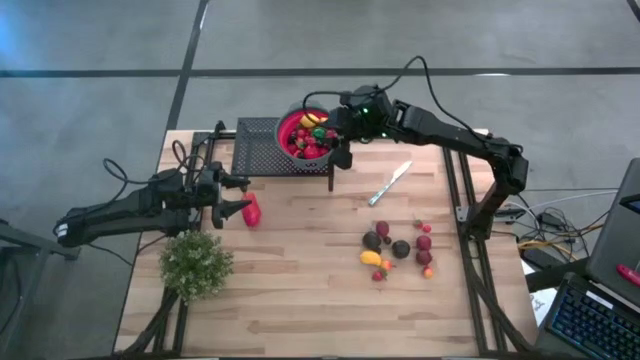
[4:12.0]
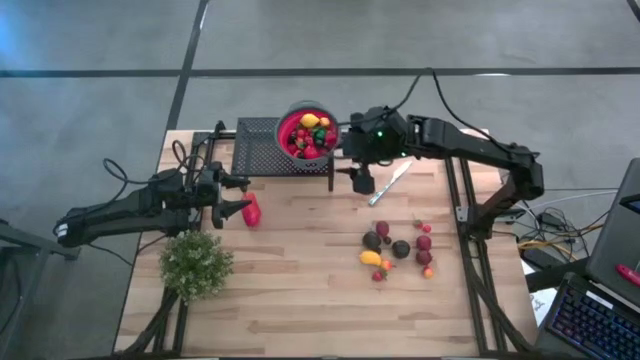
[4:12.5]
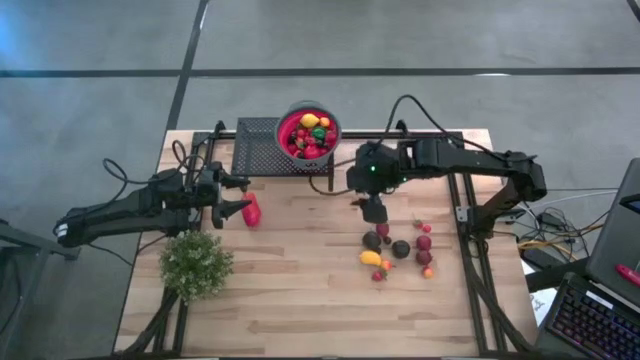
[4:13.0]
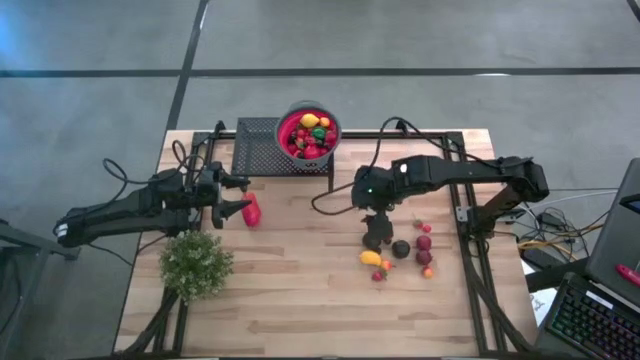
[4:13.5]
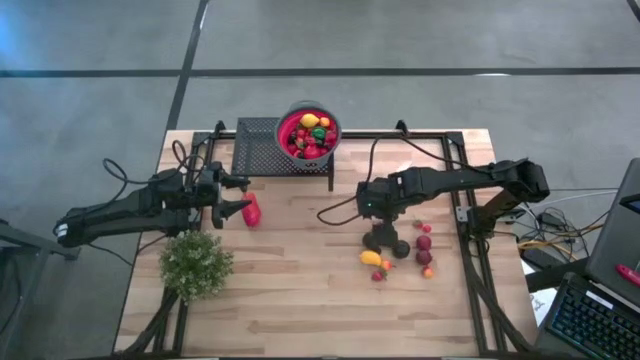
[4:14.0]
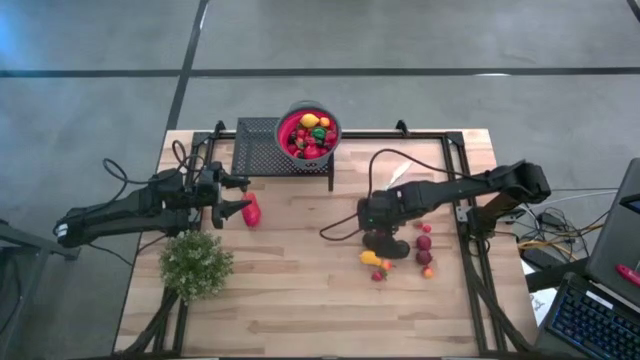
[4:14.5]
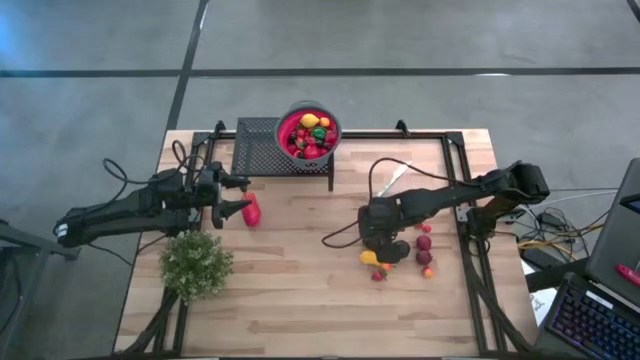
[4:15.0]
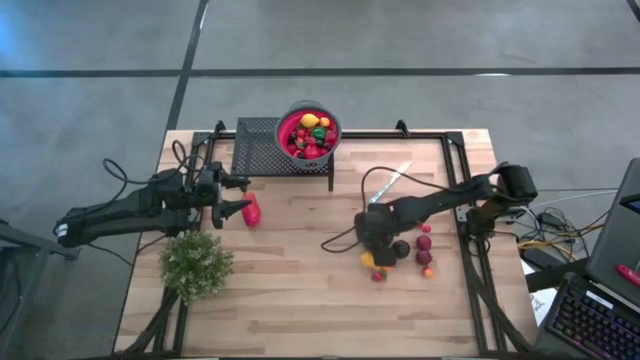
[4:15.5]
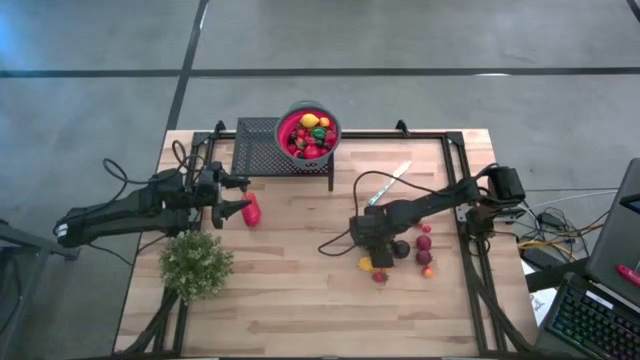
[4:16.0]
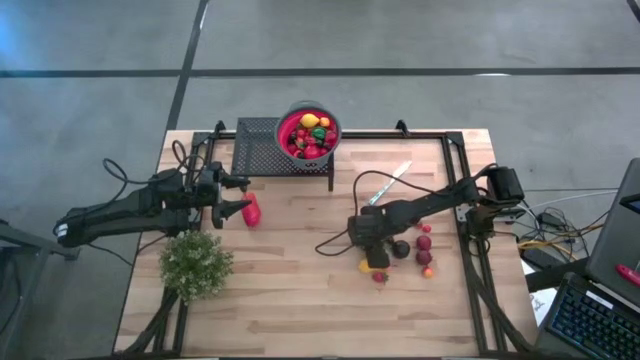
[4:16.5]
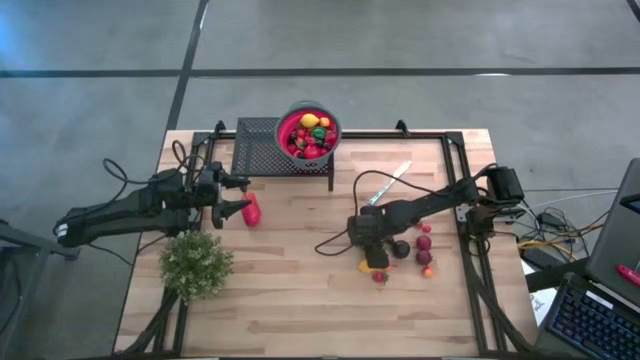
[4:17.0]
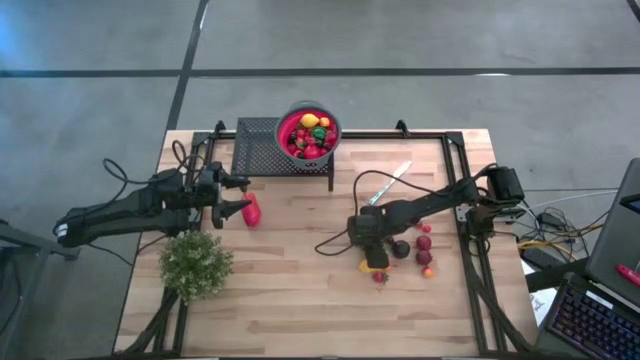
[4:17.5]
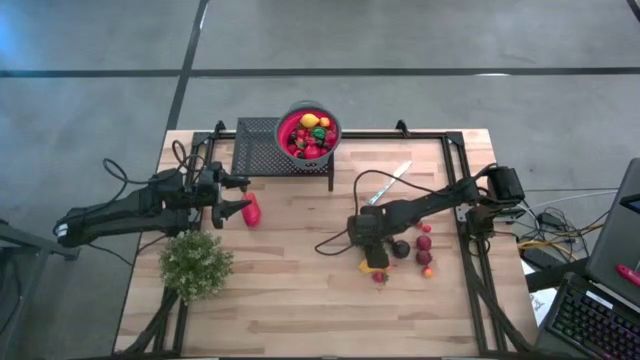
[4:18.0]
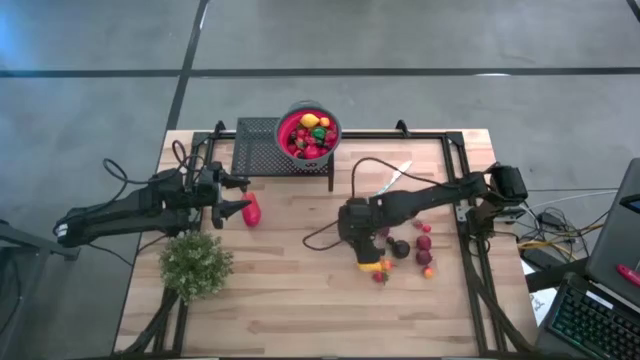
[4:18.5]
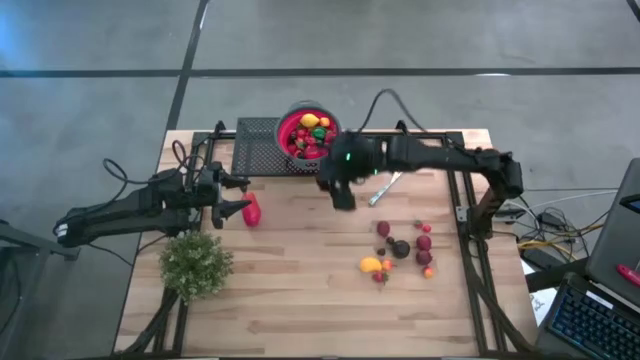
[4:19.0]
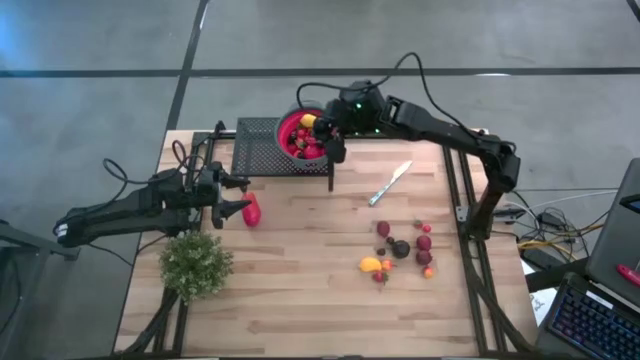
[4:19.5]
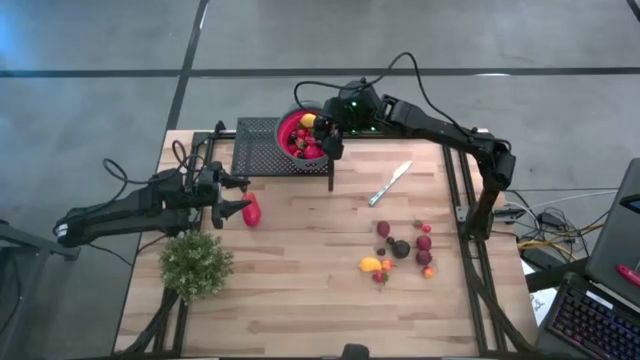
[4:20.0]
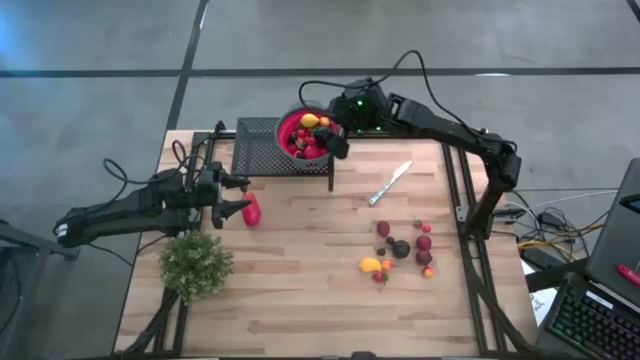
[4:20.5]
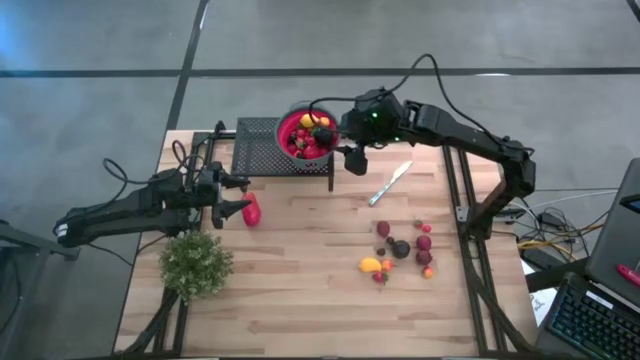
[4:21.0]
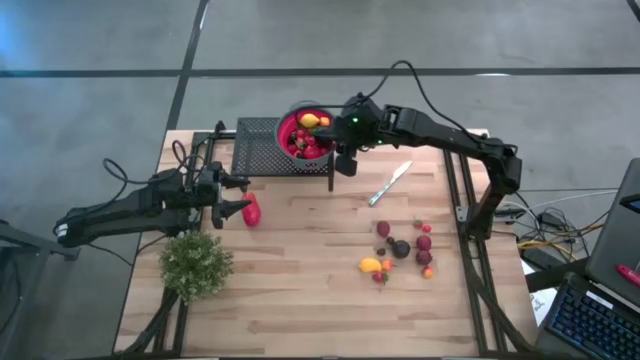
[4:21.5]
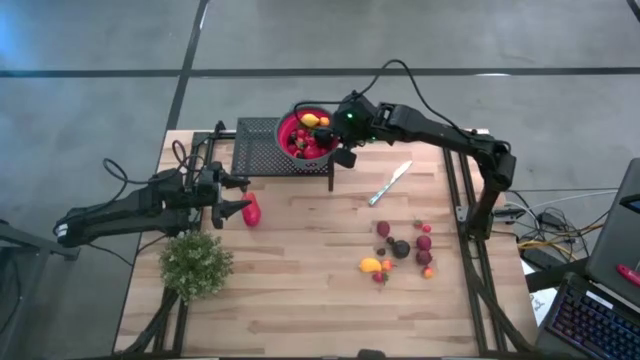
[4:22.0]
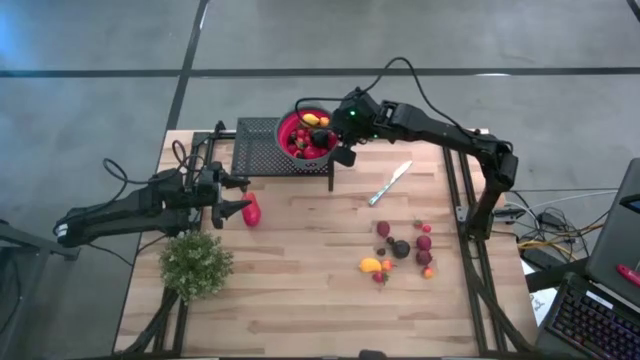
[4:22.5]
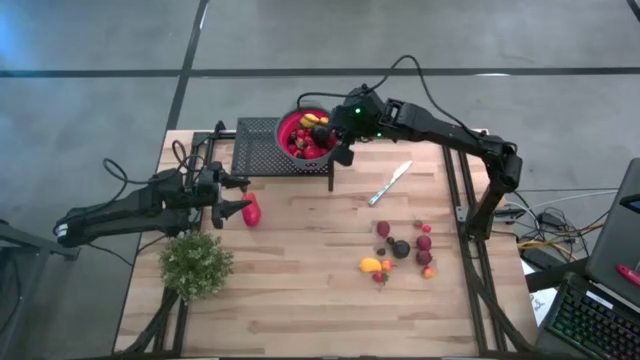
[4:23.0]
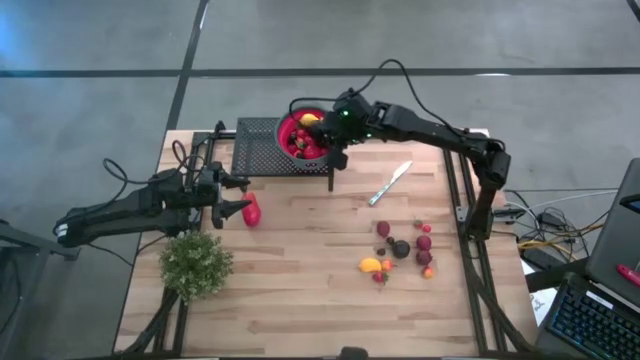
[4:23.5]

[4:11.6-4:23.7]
Task: Pick & Place Fruit
Put the black plum into the red gray strainer bowl on the shelf

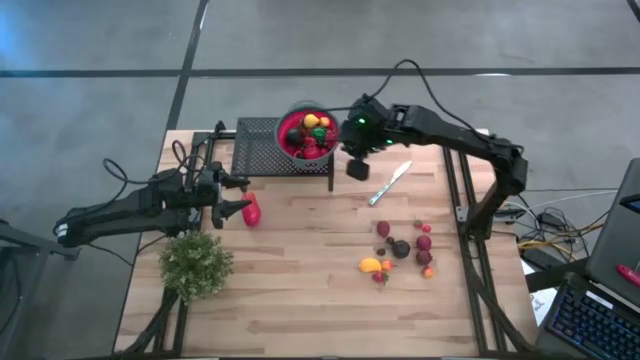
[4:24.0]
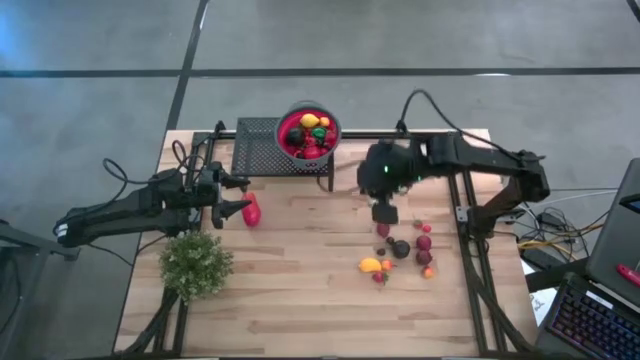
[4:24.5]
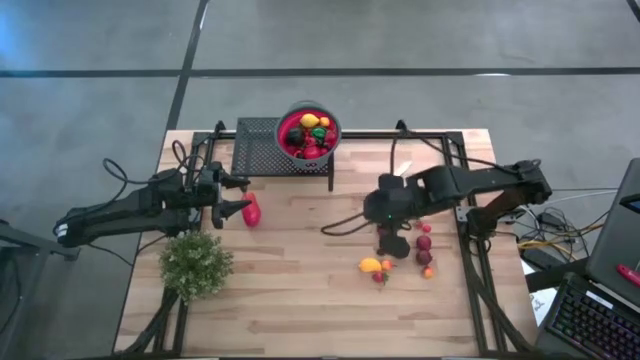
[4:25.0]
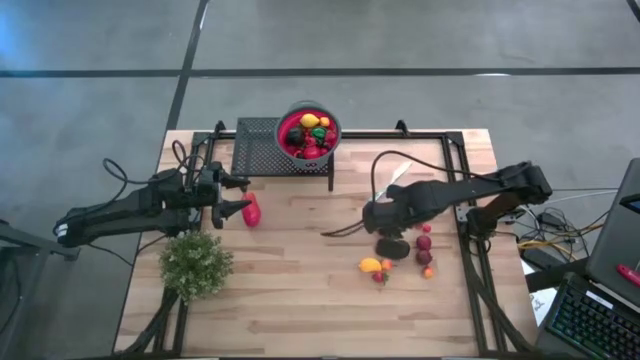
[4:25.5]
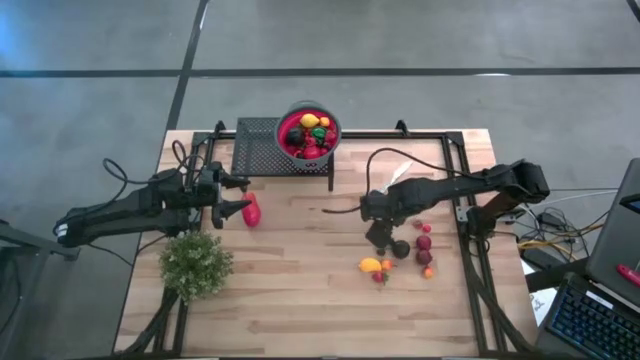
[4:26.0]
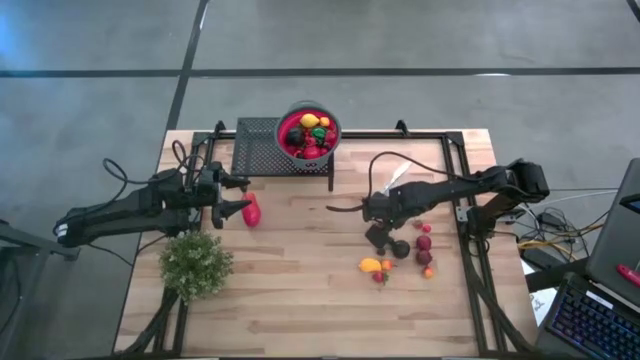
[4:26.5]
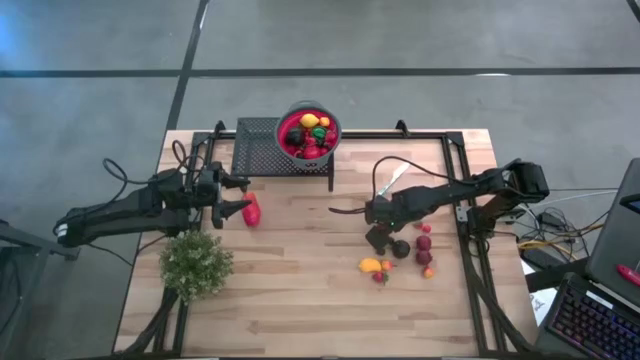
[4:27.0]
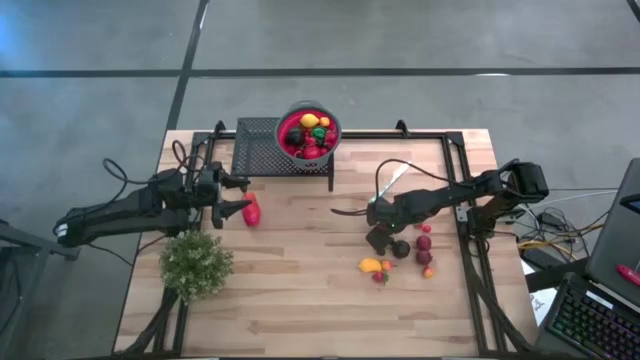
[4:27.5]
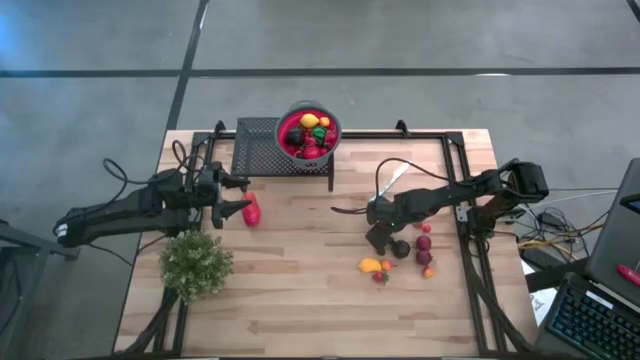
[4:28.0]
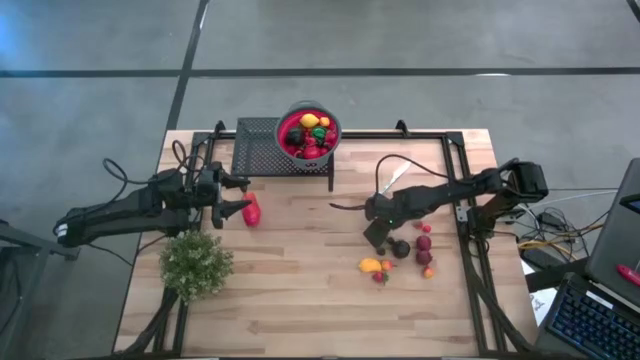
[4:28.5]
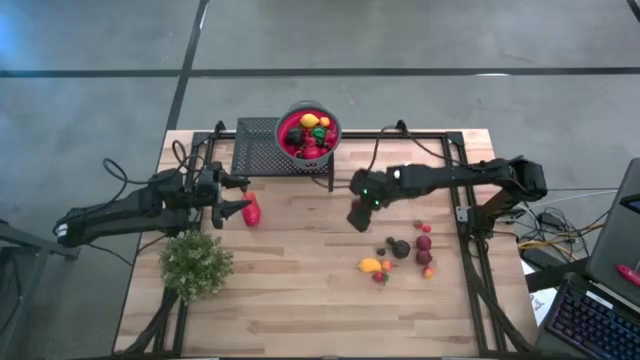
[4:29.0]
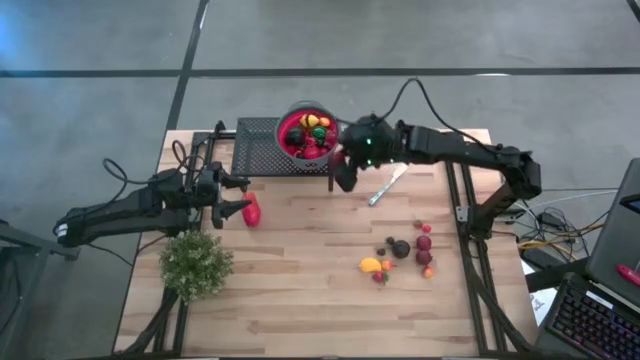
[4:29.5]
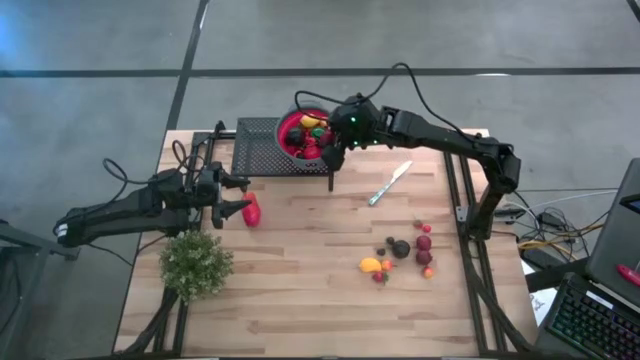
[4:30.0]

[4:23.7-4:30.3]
Put the red pomegranate into the red gray strainer bowl on the shelf

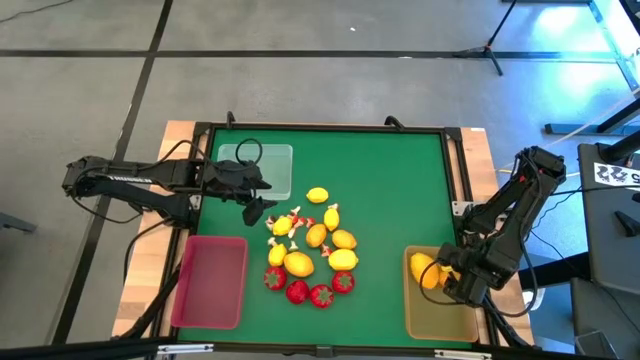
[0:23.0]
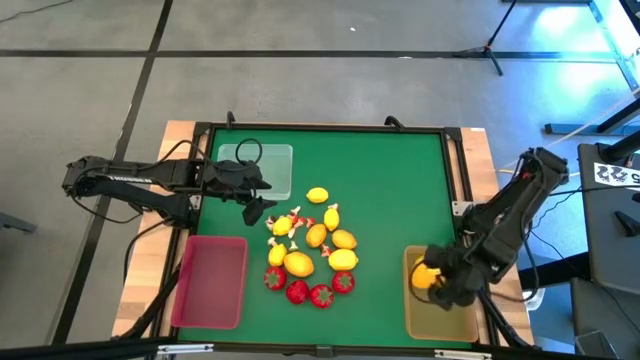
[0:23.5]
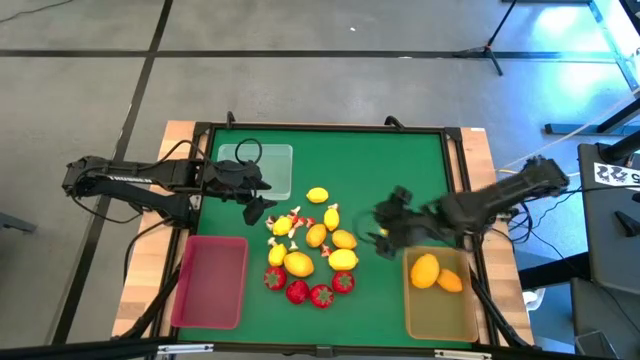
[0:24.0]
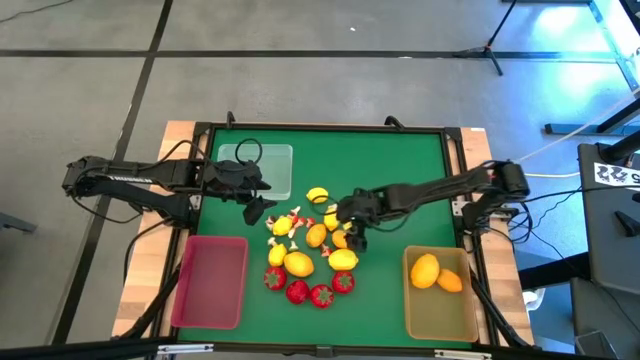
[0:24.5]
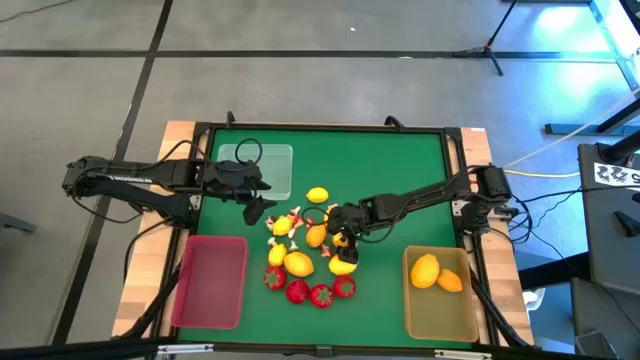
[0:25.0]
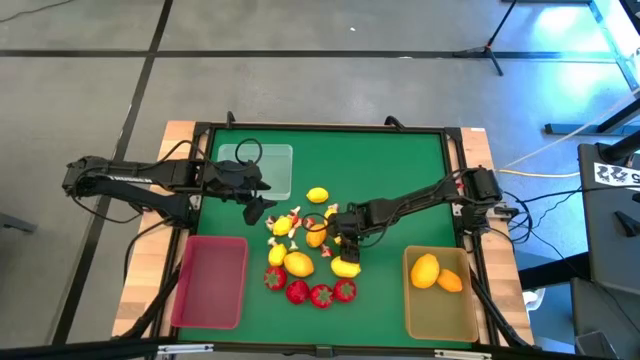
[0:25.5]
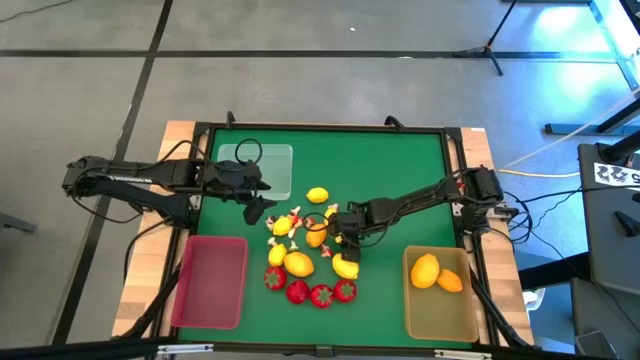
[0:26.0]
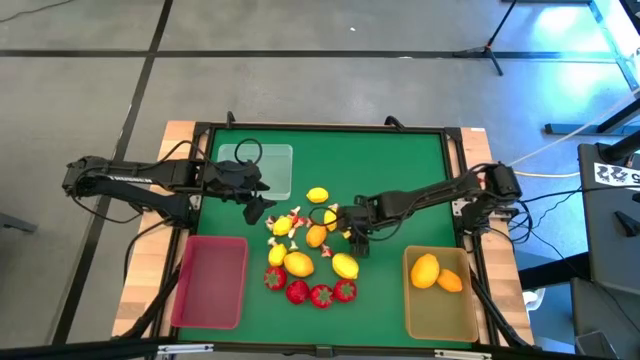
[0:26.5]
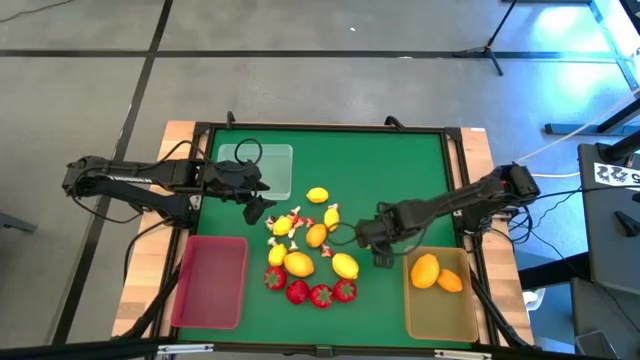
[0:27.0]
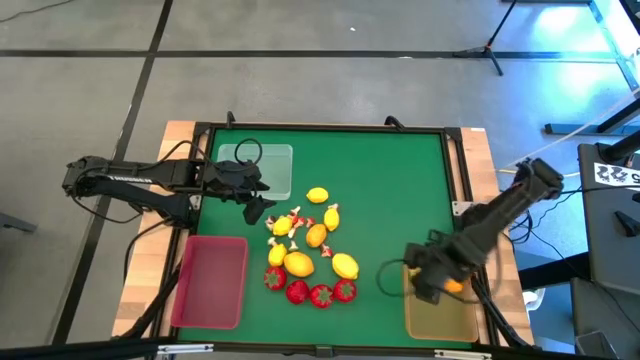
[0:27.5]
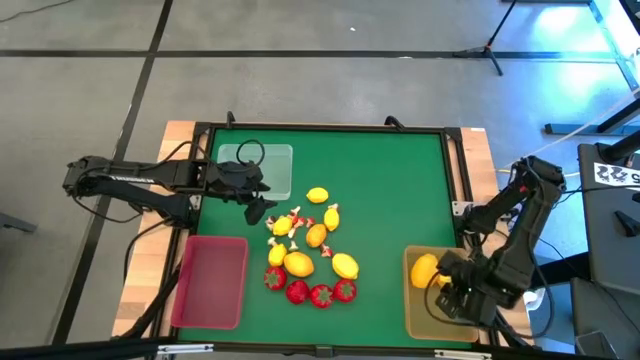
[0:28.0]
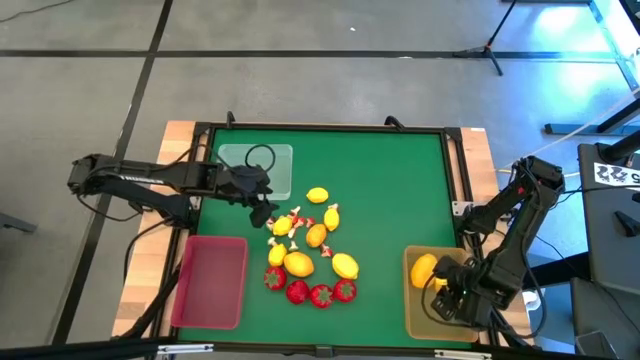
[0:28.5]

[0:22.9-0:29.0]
Task: Sort produce into baskets
Put the lemon into the orange bin
